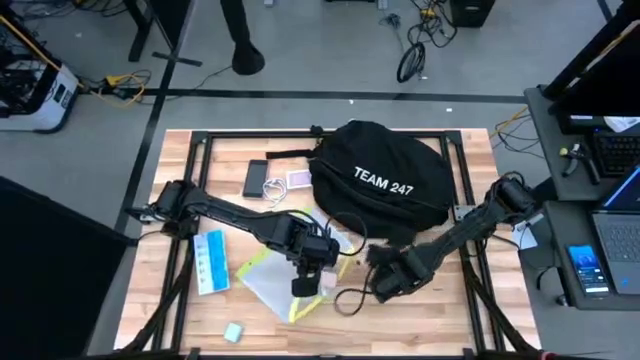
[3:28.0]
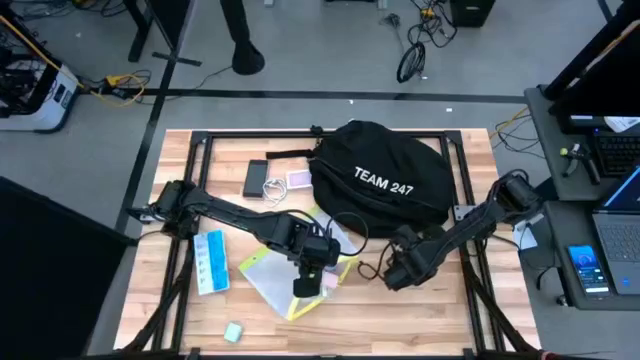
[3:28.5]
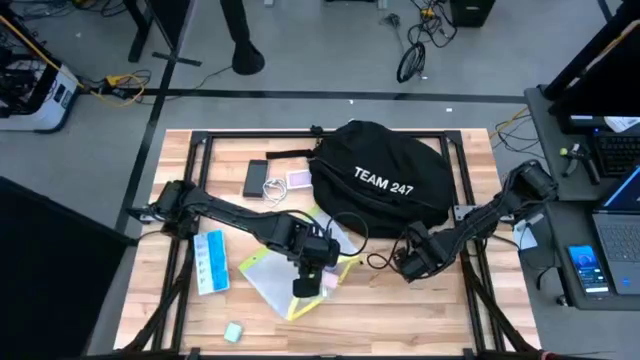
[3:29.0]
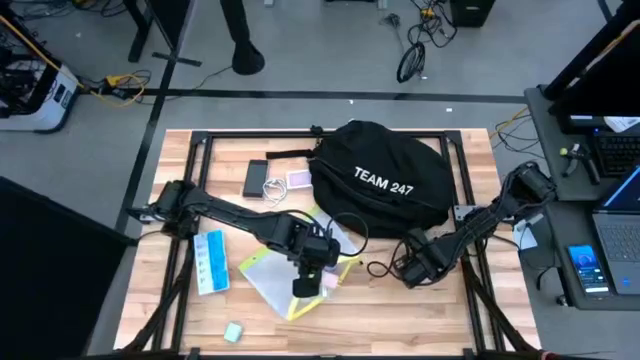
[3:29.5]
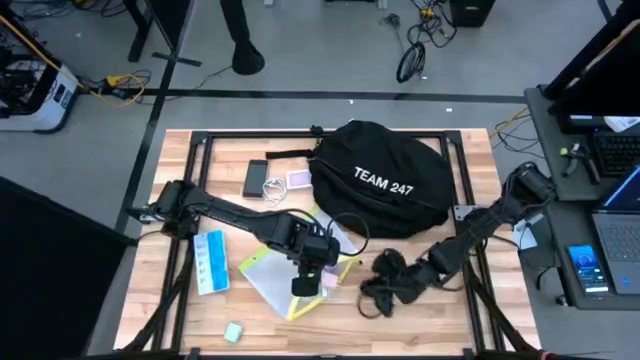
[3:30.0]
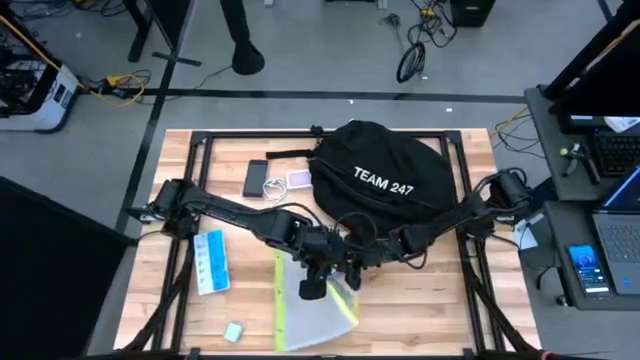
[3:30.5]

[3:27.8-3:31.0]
Task: Unpack backpack
Put the black charger cable into the green zip bag

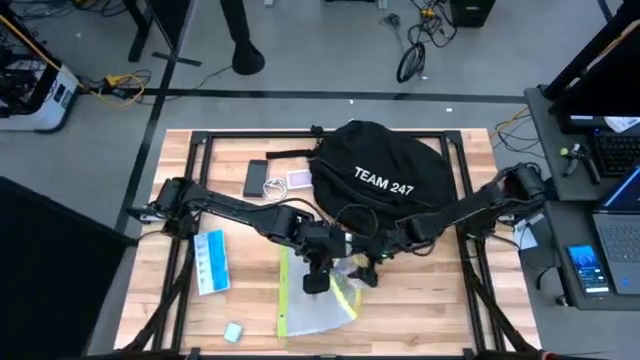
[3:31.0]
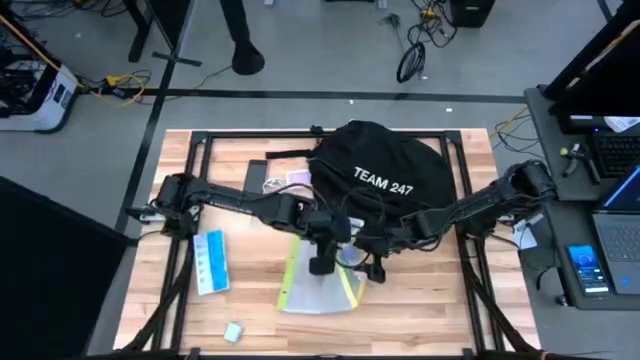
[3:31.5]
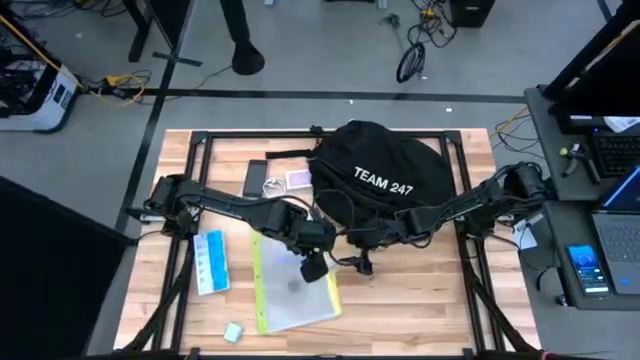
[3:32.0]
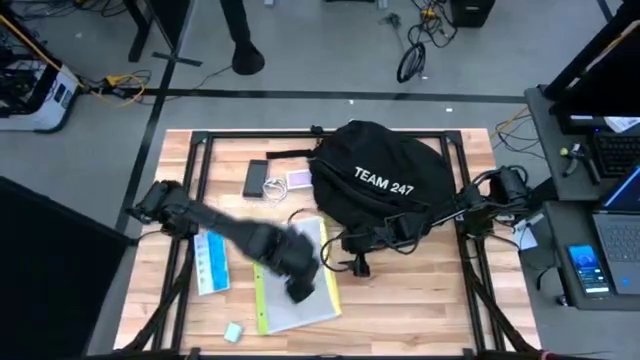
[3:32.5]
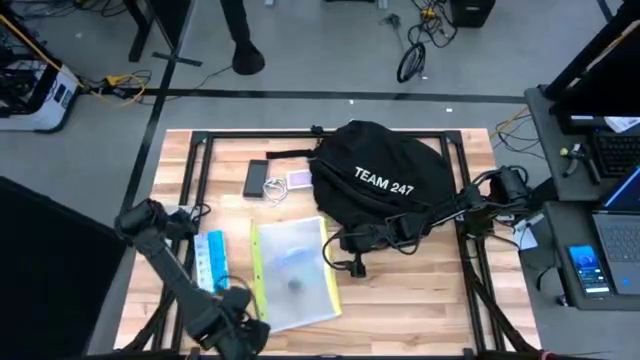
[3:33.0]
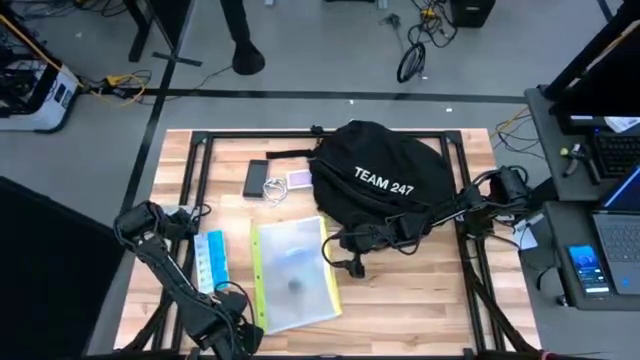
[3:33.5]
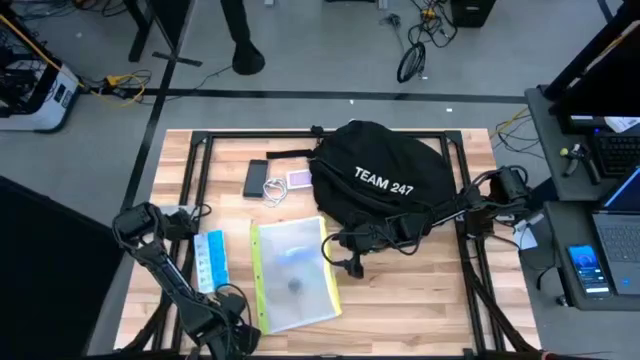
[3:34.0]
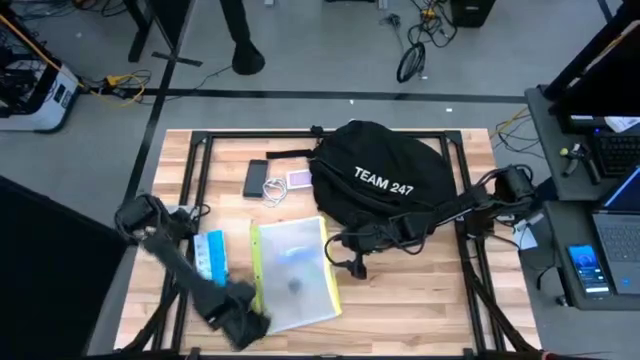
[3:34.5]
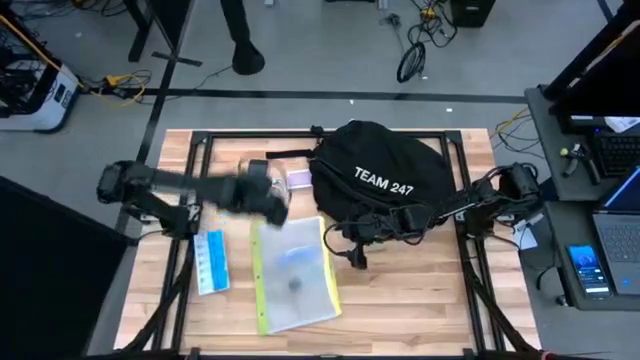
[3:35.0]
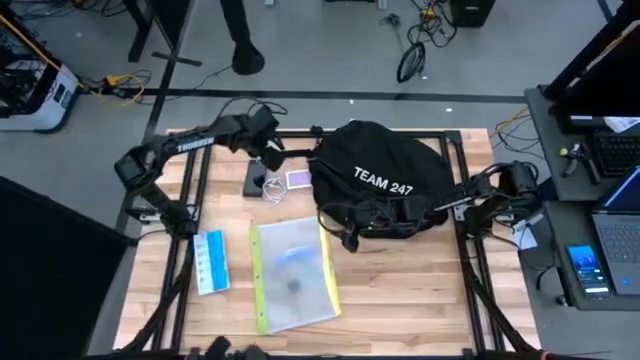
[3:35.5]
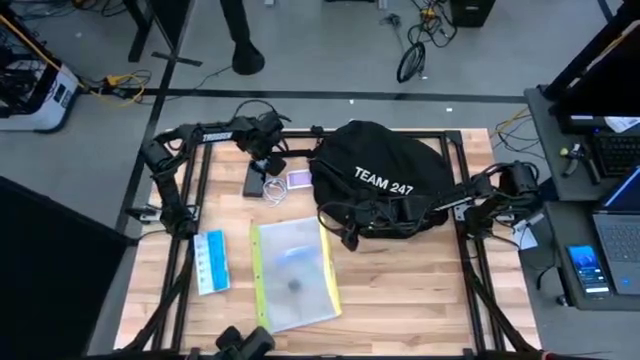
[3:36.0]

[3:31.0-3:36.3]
Move the white charger adapter on the top of the cellphone

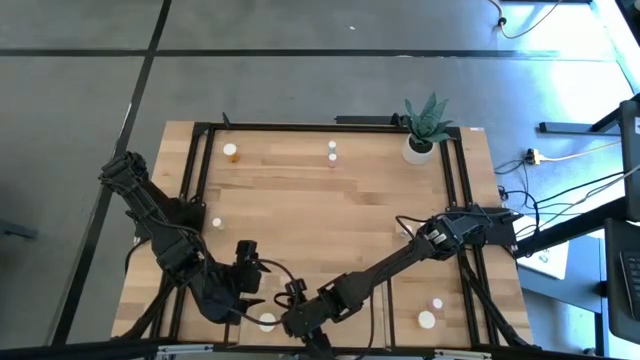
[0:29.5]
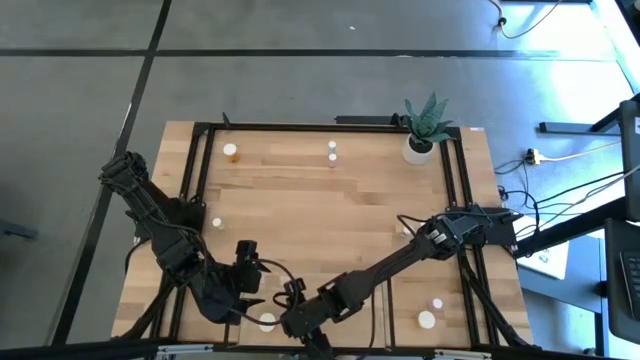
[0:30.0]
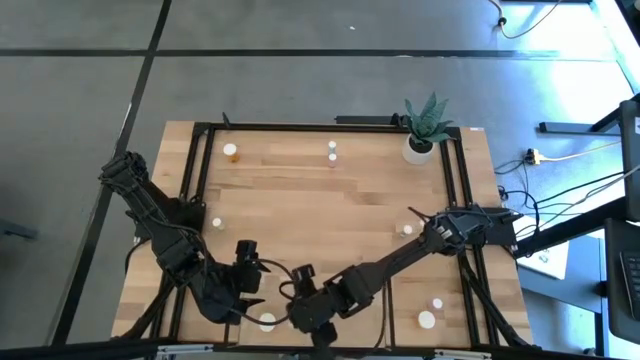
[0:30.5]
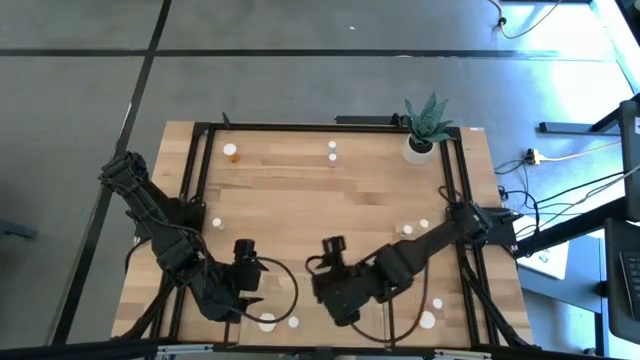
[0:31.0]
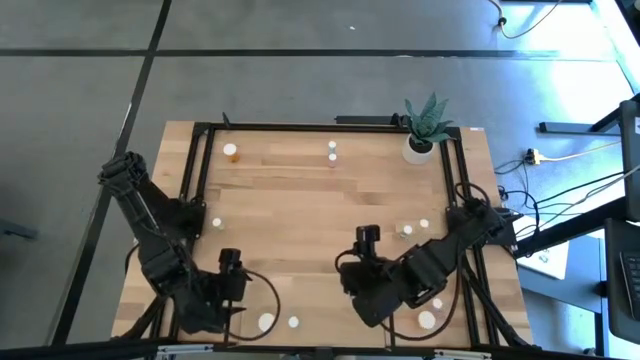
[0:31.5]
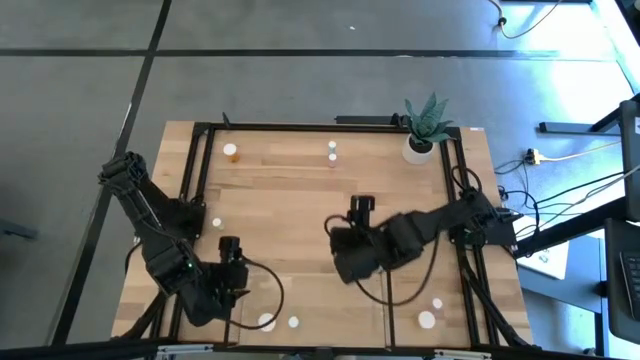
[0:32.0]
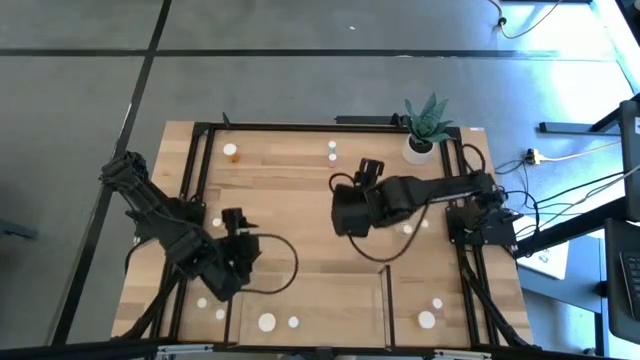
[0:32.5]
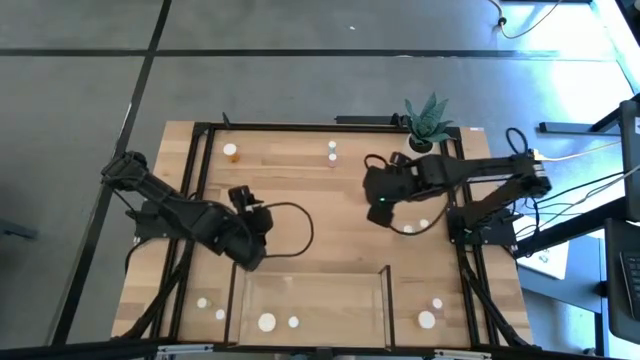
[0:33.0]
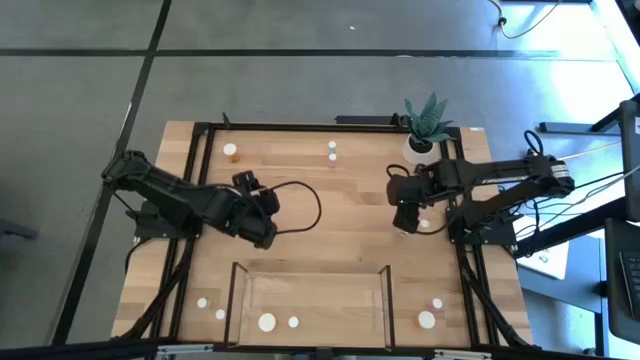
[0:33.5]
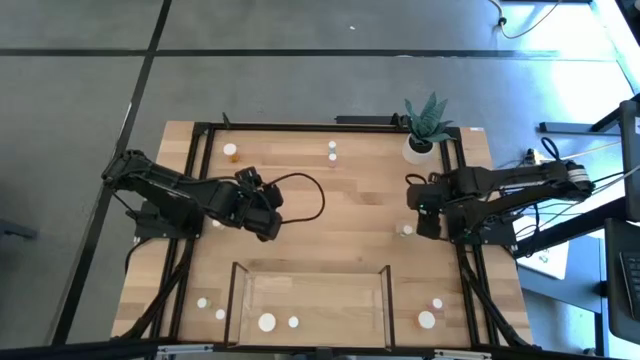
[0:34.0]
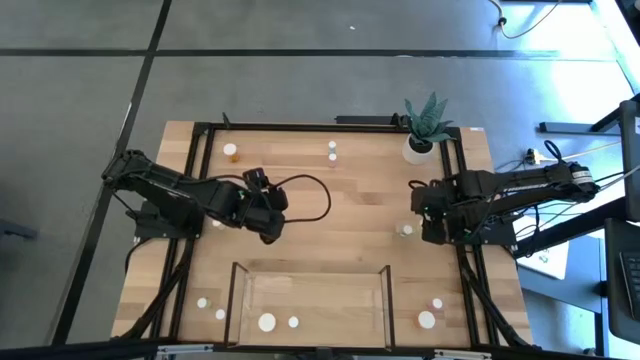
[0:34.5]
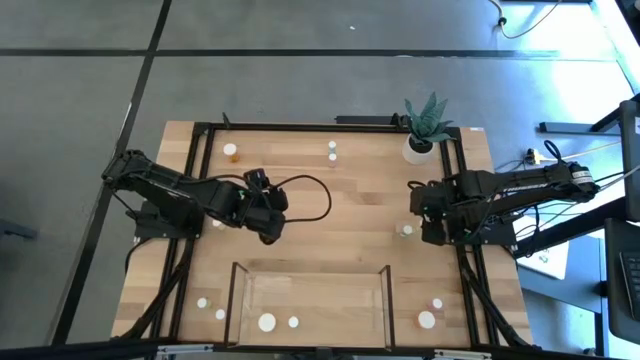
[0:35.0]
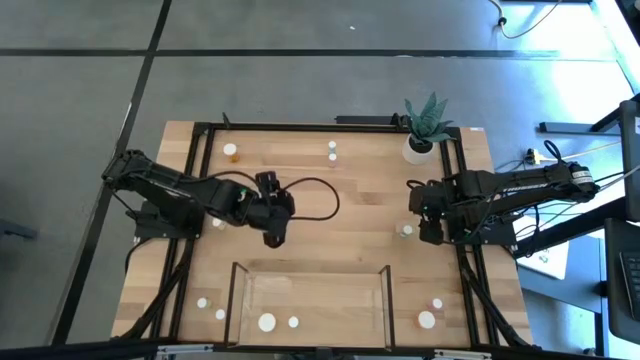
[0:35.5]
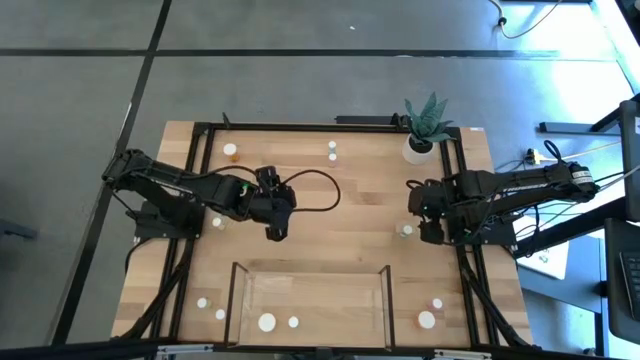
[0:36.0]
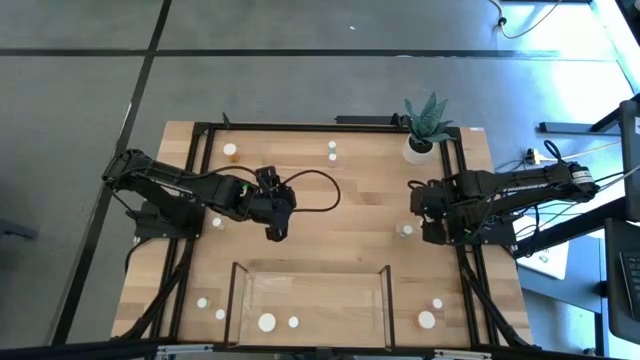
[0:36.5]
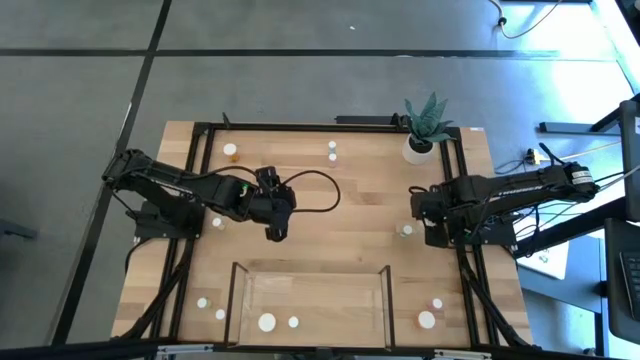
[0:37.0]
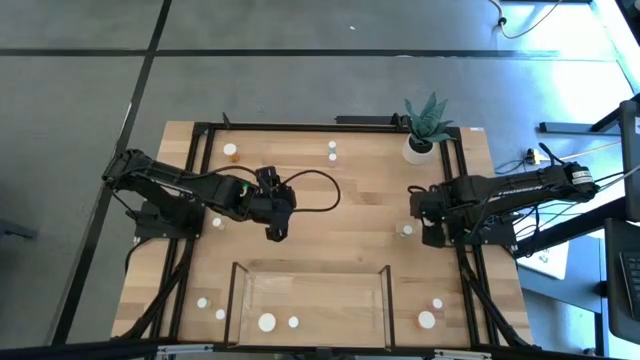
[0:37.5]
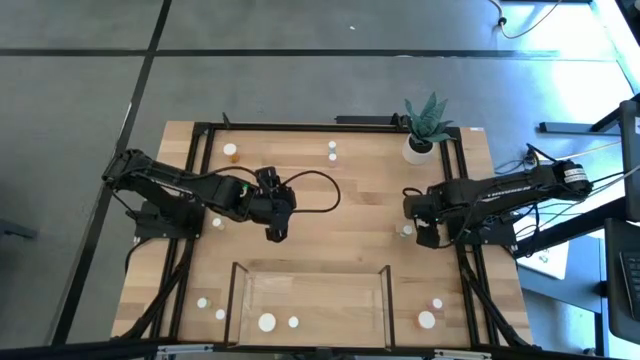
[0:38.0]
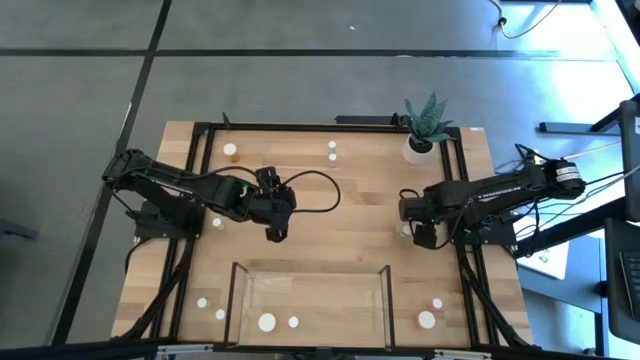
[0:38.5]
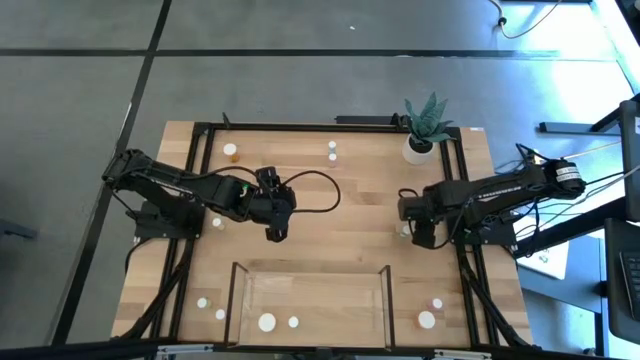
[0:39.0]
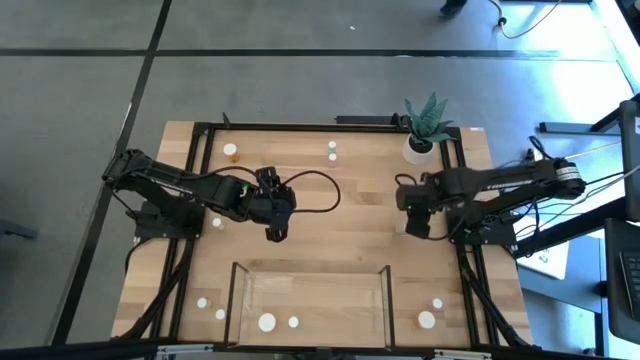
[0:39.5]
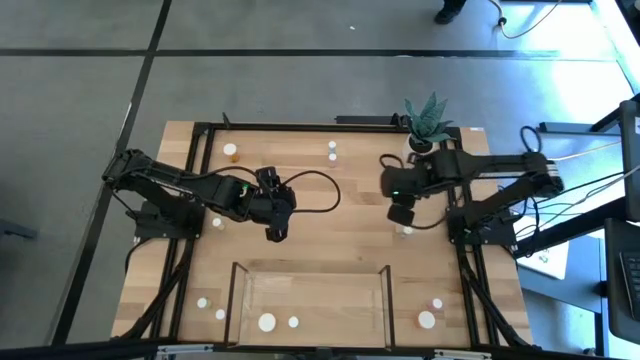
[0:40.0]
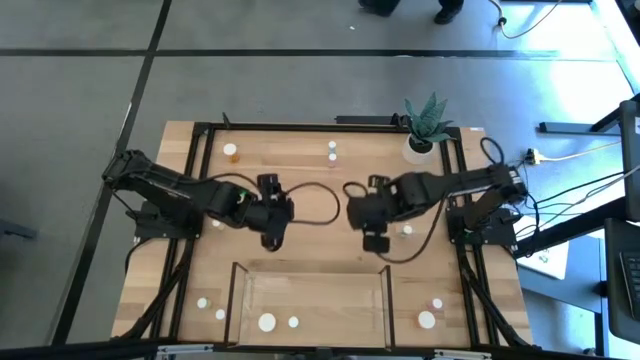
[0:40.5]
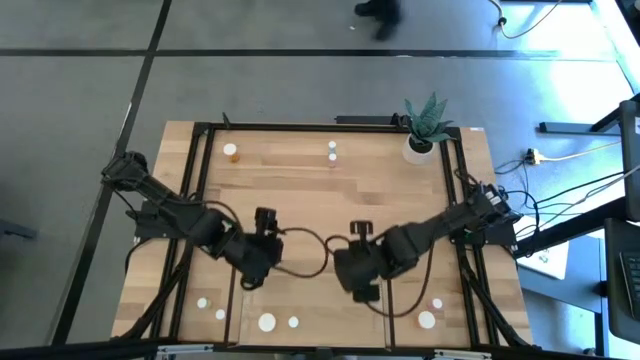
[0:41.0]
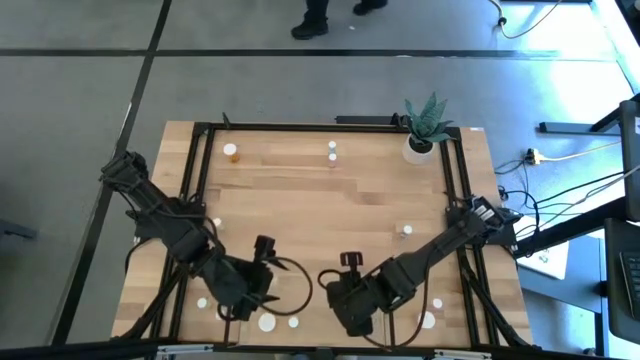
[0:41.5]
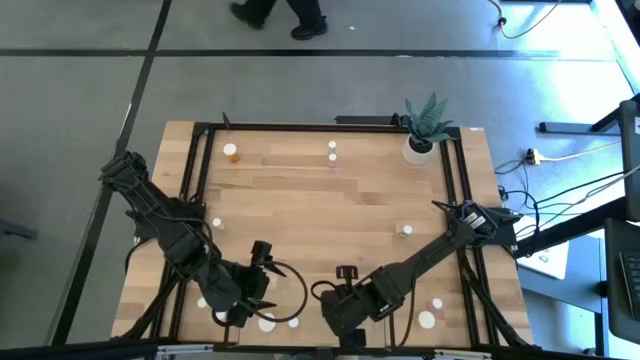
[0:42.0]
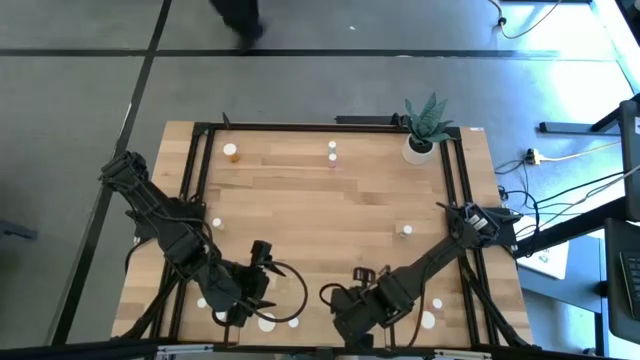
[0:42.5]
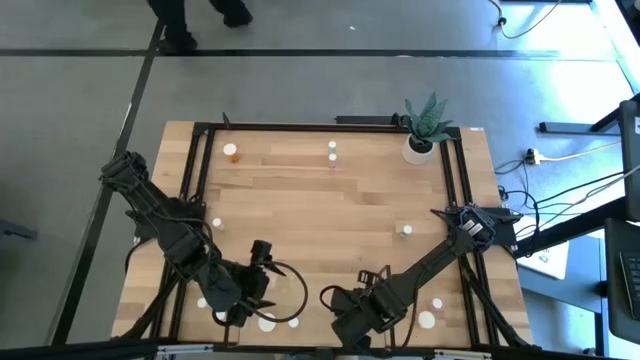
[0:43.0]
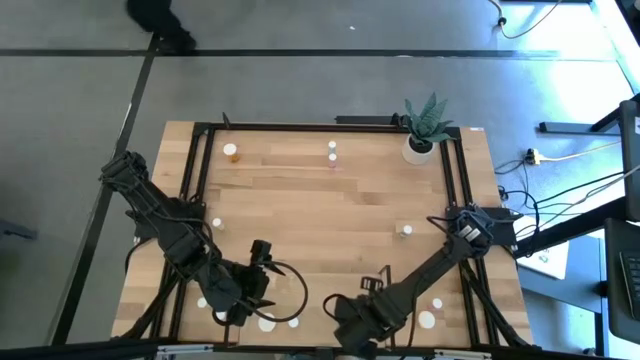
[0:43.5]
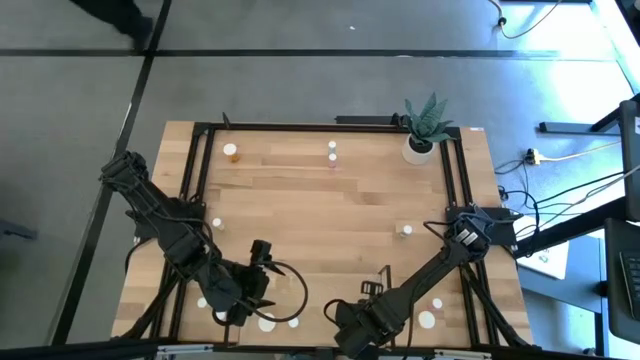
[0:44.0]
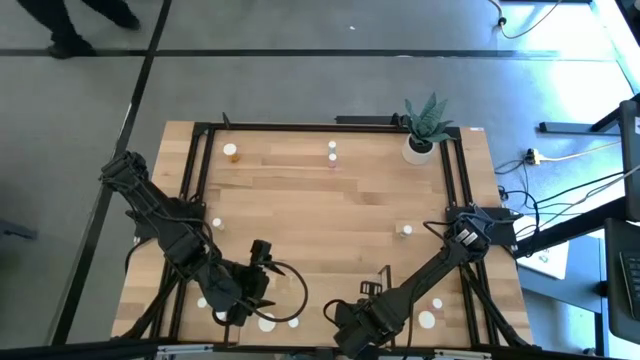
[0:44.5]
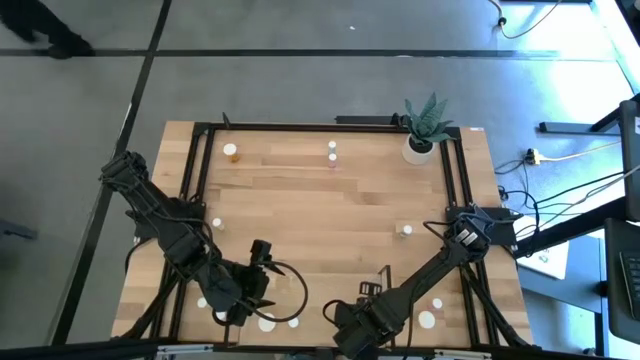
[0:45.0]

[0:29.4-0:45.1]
Task: Pick and place medicine bottles onto shelf by color
Put the top right yellow pill bottle on the shelf
